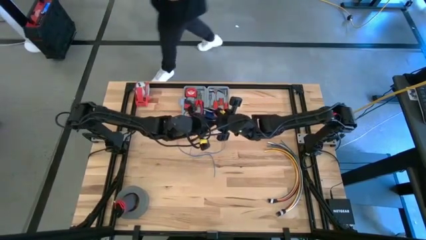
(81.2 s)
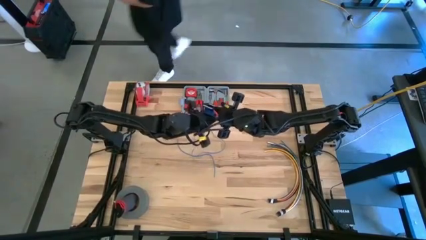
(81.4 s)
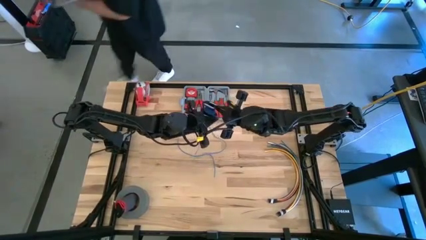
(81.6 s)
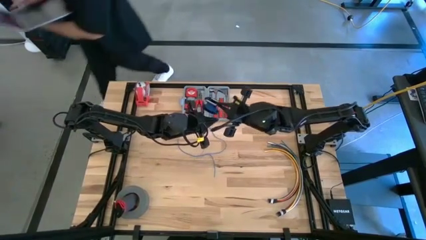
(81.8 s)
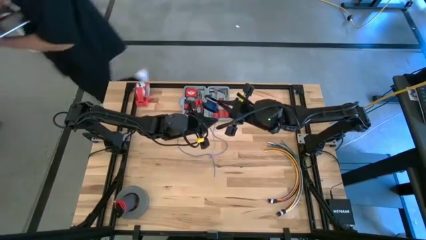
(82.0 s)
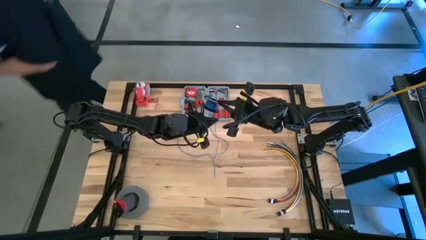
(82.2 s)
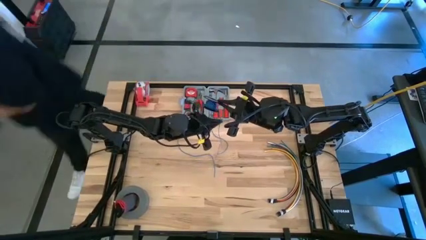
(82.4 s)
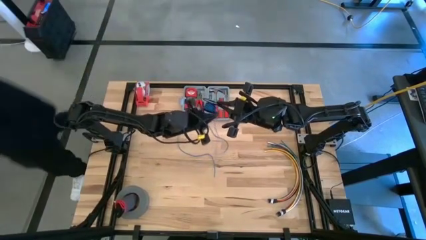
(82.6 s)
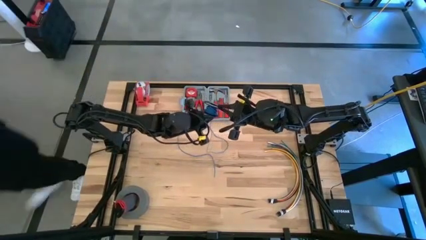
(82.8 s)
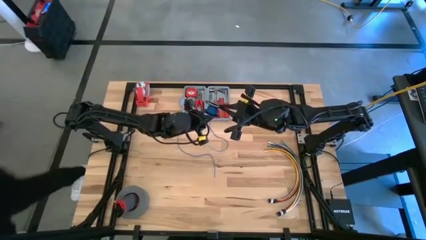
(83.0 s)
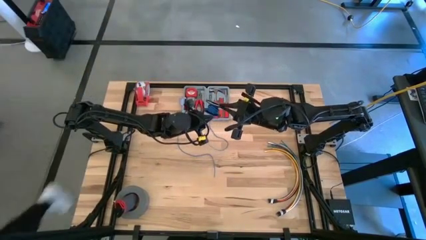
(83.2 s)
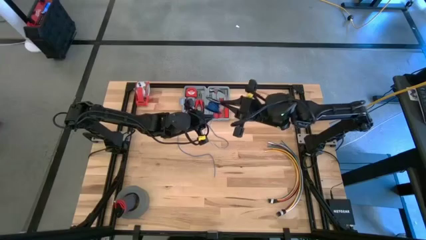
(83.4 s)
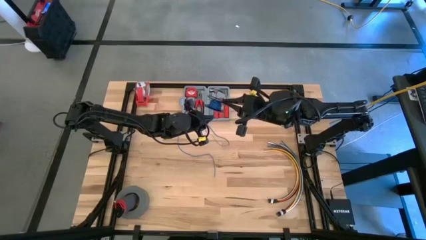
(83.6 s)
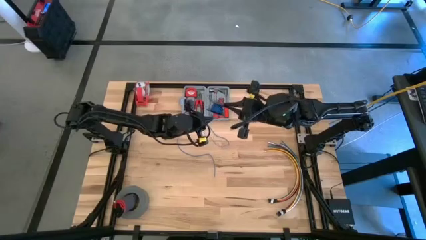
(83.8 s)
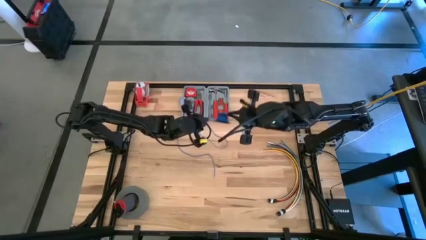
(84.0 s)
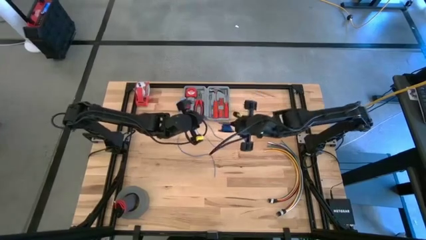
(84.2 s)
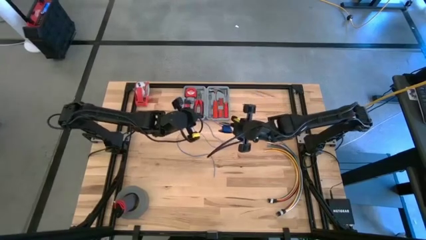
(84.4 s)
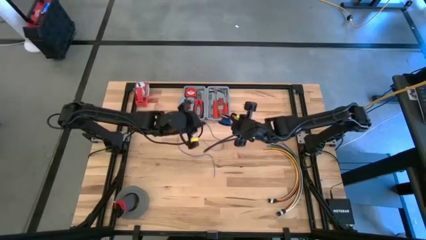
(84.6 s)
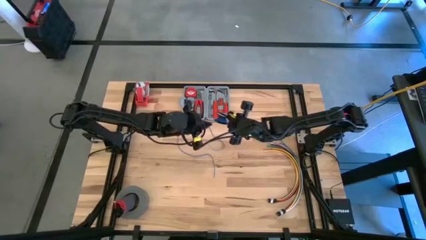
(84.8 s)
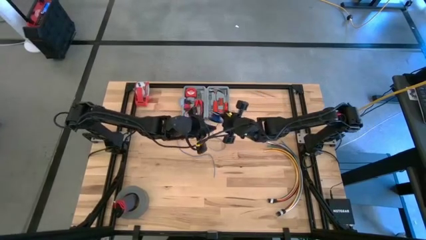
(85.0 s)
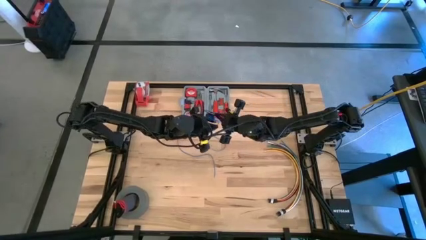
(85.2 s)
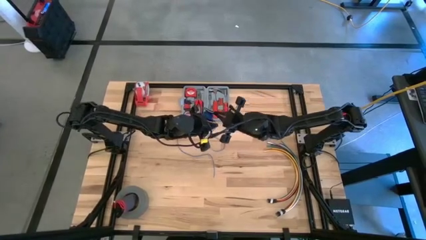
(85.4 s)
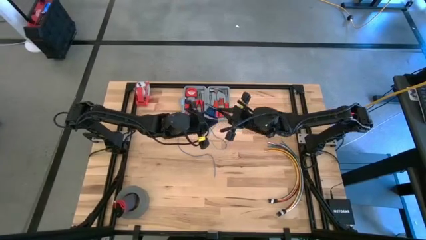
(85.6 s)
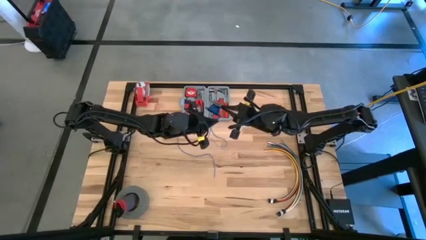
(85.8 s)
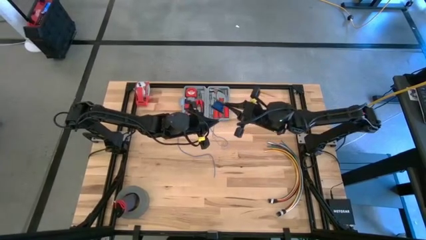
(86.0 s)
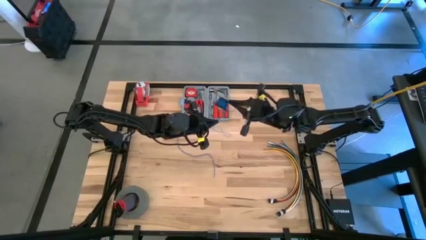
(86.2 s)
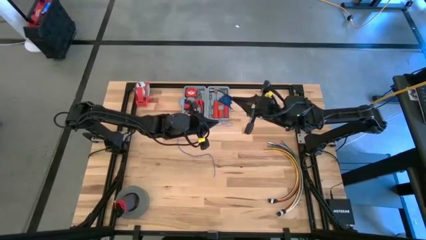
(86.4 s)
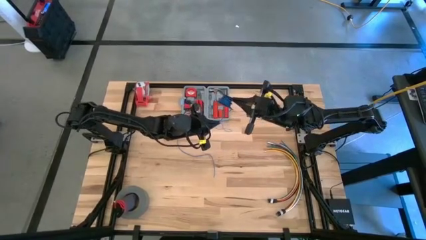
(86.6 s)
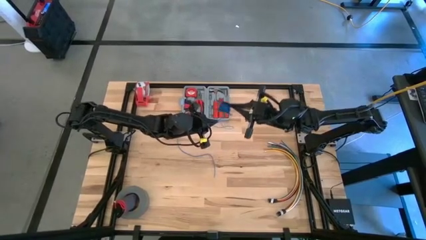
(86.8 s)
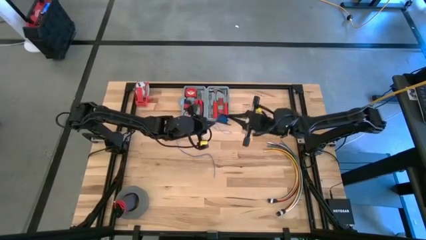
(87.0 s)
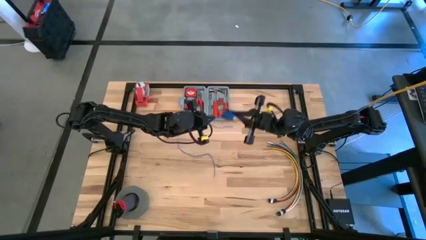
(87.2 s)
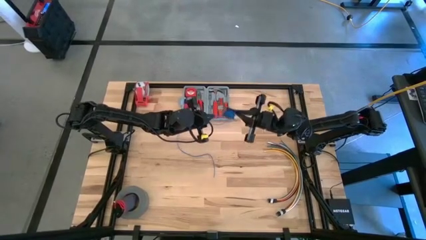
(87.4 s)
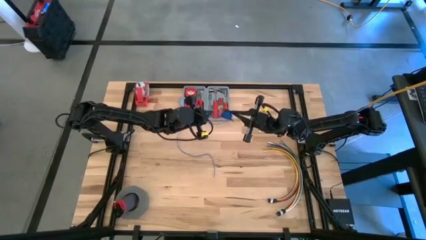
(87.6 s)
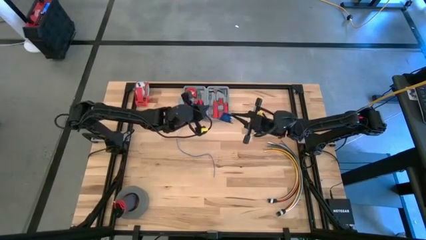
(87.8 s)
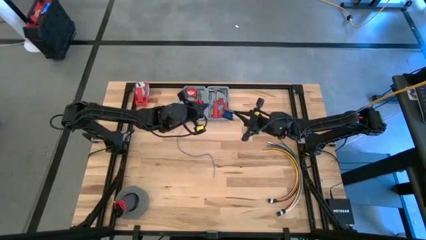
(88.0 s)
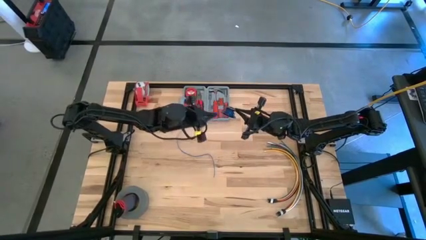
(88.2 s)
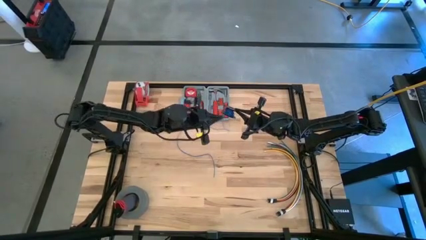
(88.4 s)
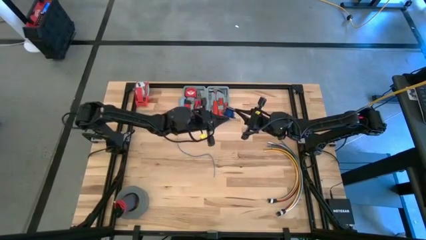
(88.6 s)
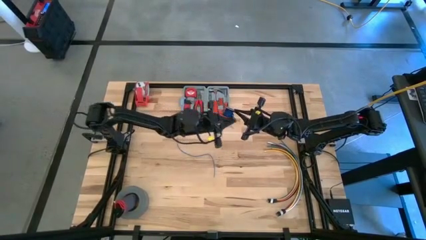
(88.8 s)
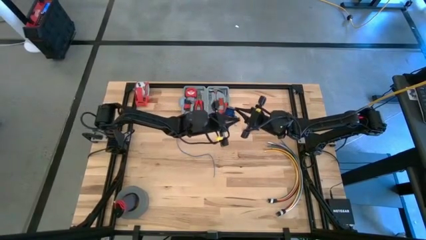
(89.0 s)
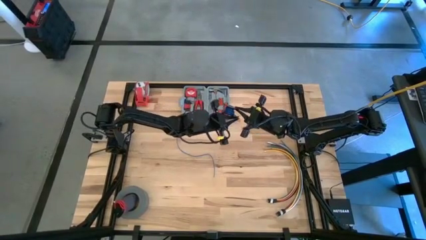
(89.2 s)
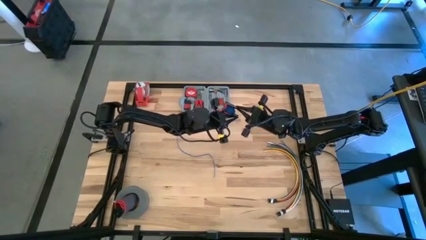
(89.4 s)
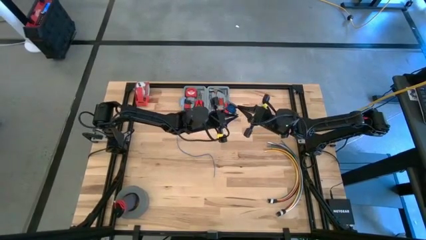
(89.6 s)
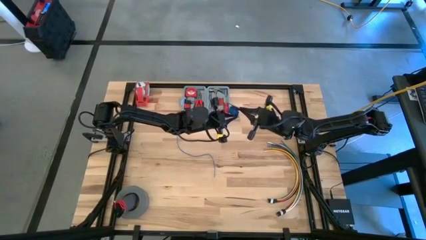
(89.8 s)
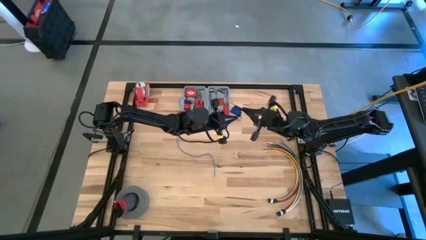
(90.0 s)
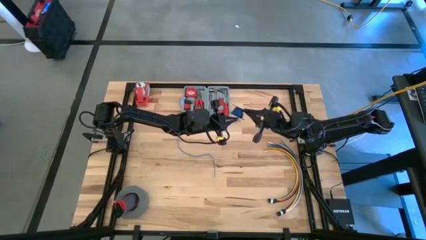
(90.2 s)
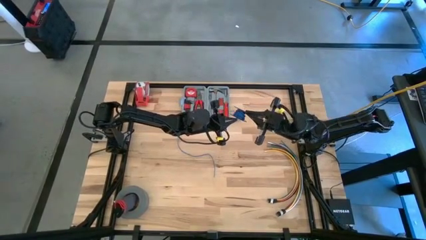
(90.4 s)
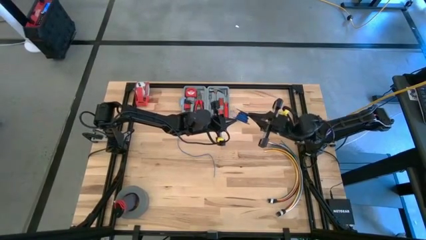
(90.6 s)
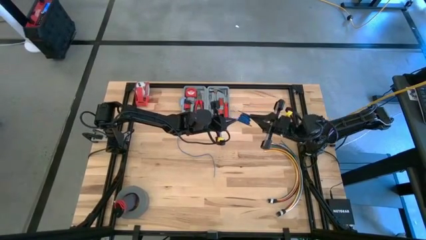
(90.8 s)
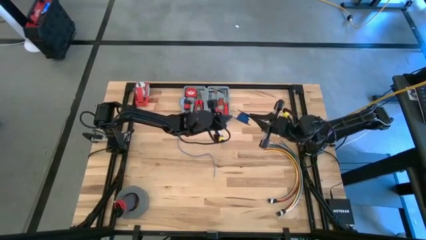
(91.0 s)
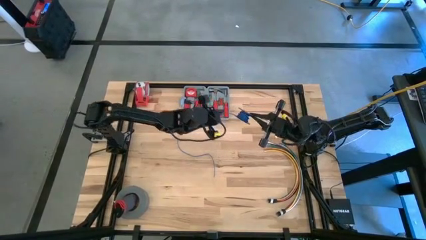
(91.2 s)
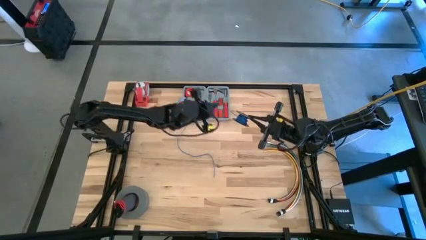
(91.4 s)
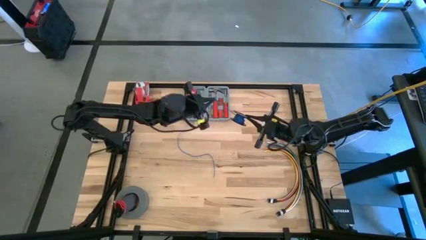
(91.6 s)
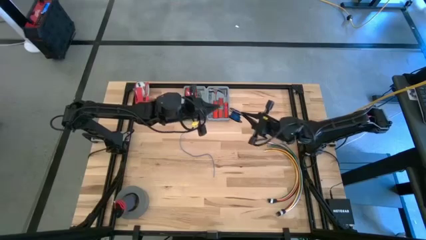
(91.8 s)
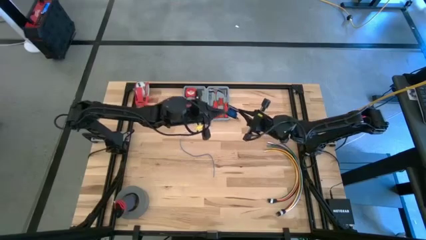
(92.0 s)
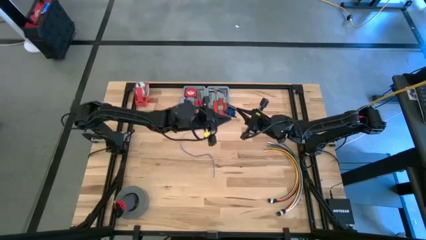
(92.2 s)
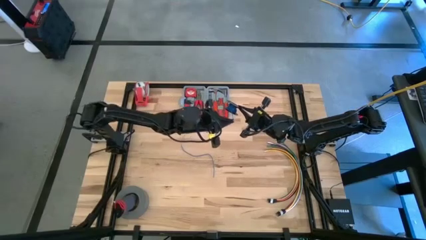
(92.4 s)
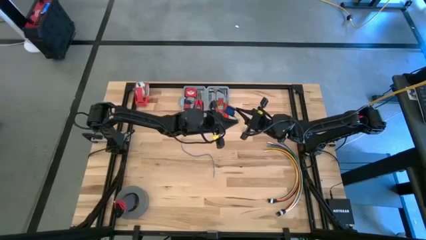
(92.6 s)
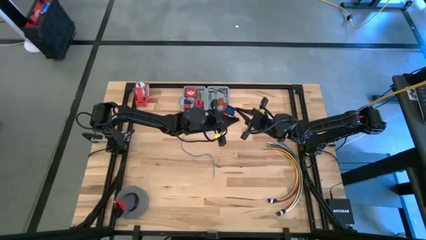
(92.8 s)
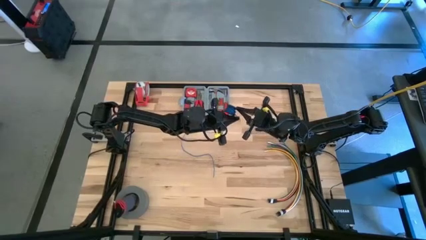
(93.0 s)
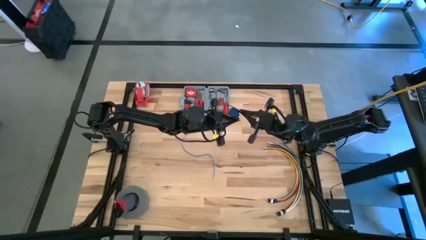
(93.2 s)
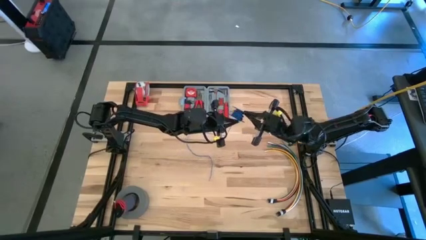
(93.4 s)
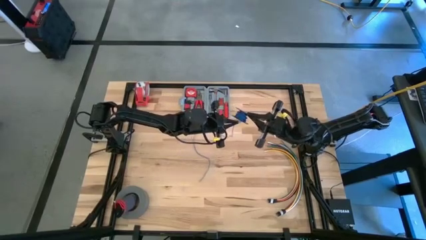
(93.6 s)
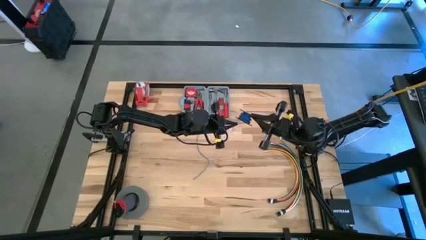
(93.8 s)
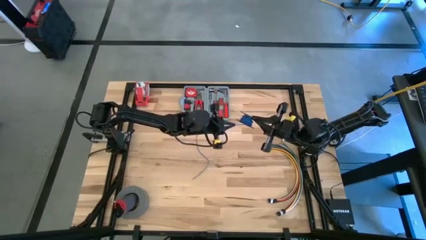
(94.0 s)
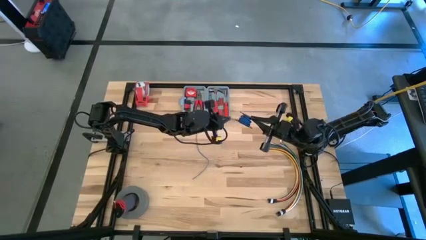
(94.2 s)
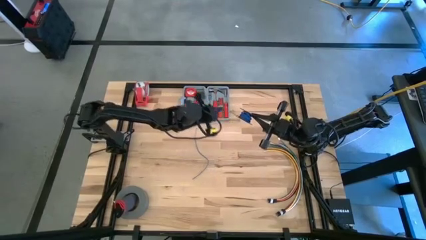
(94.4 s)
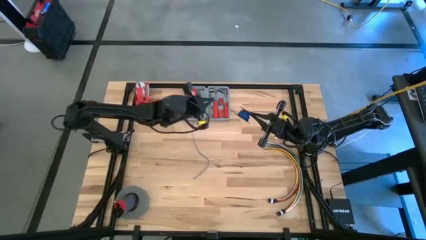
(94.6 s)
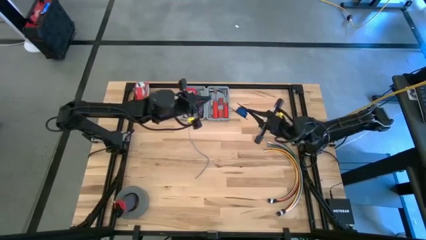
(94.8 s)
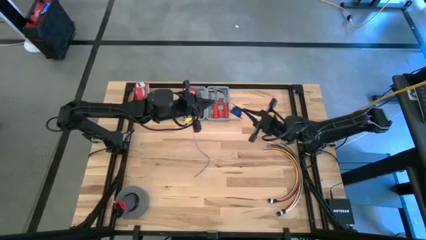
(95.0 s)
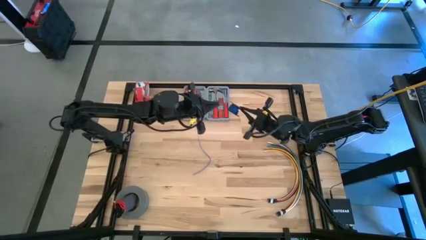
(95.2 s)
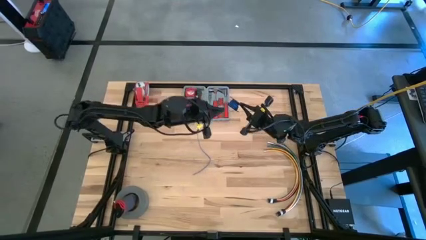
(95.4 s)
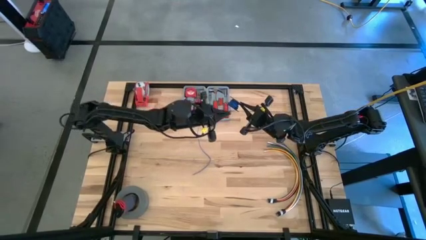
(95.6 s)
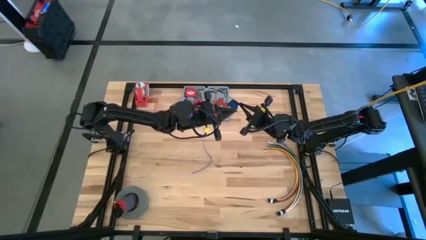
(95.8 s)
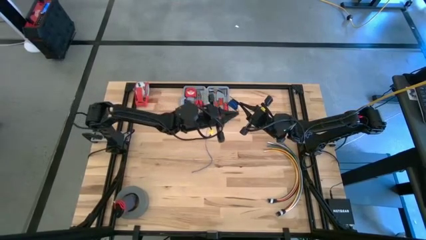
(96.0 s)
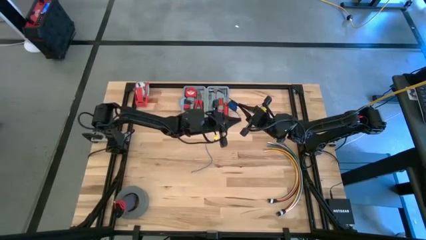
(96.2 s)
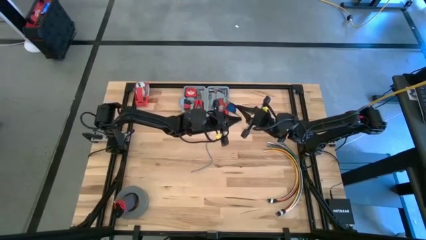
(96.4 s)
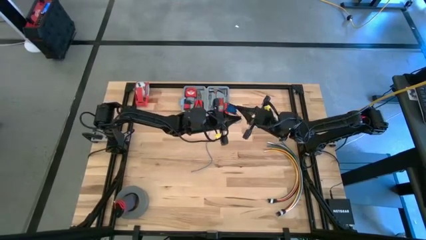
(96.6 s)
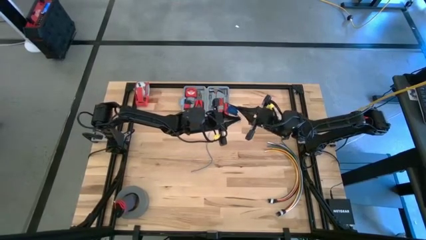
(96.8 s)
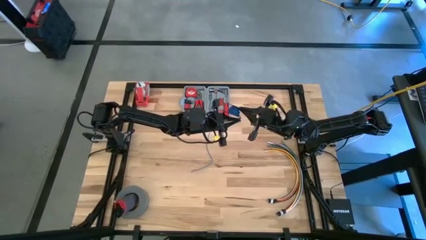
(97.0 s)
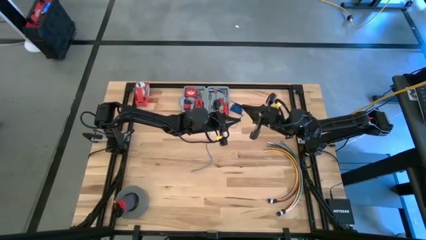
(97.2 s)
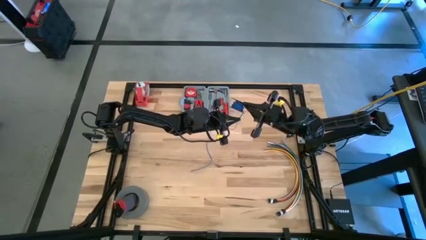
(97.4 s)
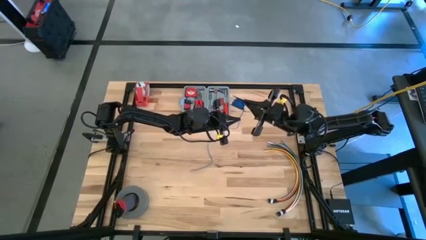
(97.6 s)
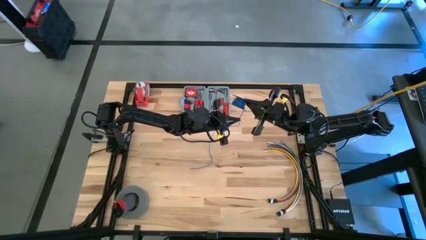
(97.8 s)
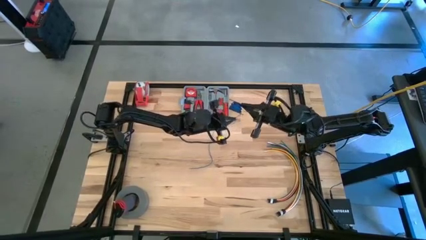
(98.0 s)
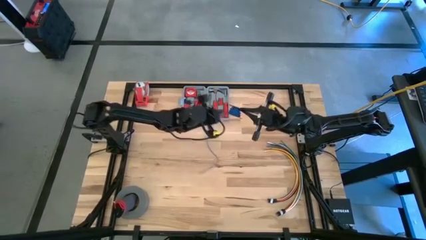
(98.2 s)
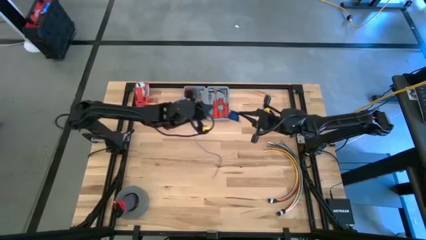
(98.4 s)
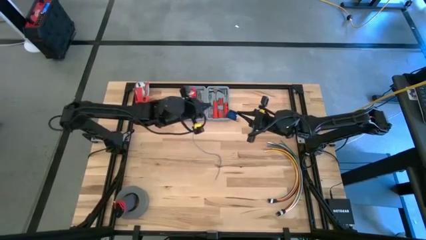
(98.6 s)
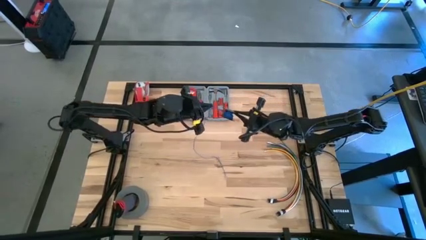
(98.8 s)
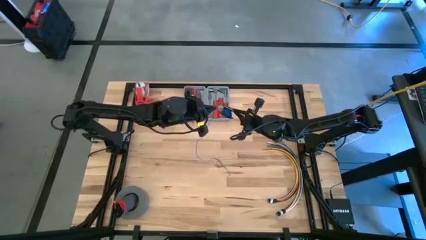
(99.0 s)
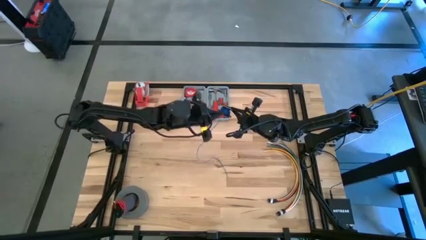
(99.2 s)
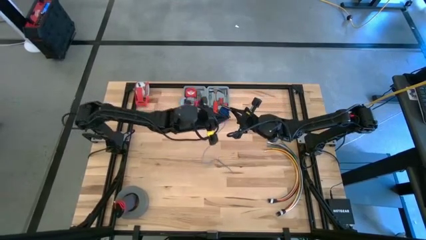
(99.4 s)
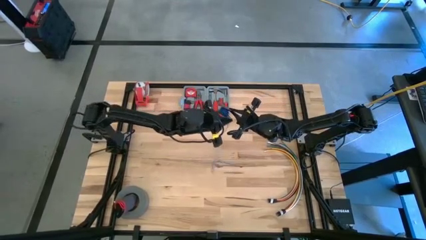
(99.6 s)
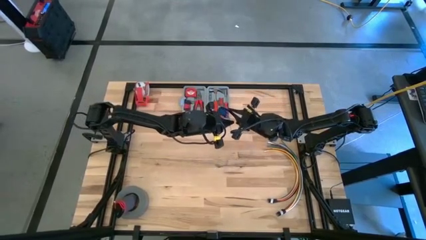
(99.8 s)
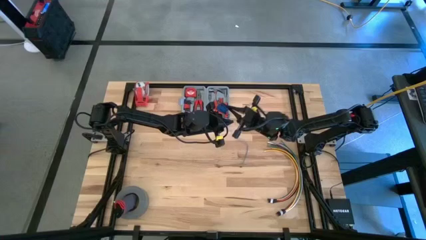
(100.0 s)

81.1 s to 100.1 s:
Task: Coil cords
Coil the blue wire into the black spool
